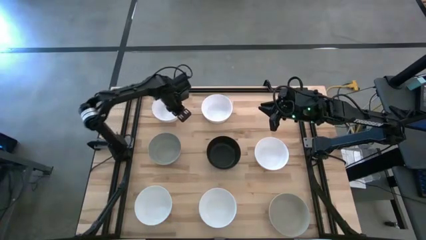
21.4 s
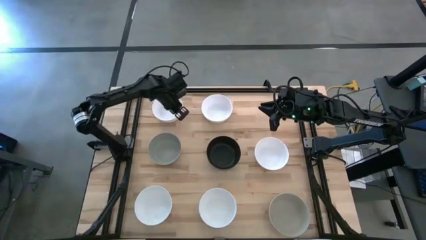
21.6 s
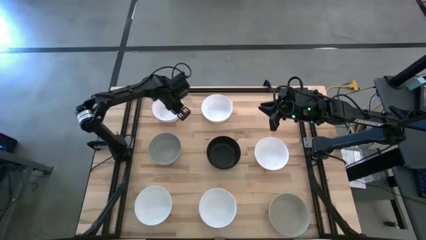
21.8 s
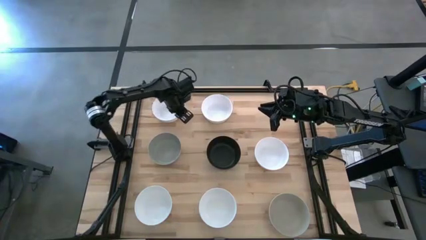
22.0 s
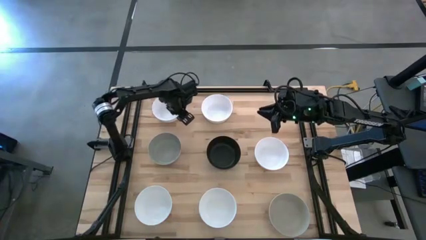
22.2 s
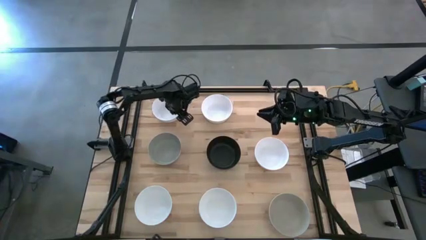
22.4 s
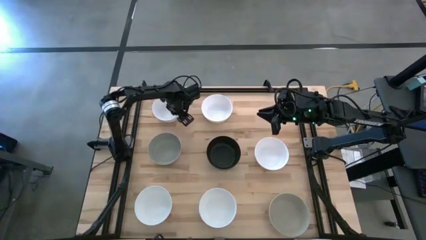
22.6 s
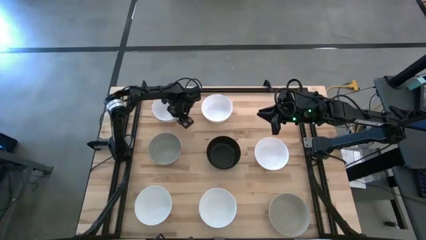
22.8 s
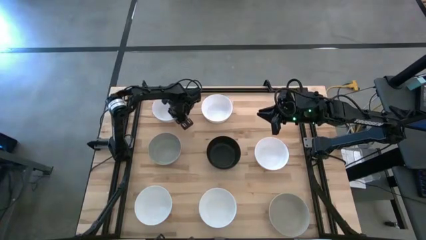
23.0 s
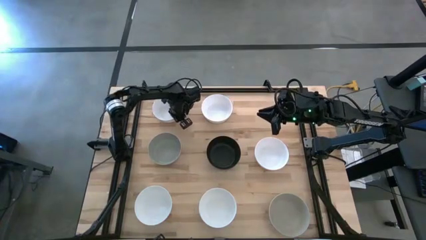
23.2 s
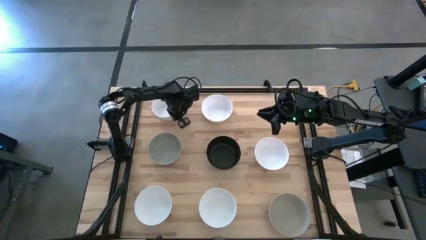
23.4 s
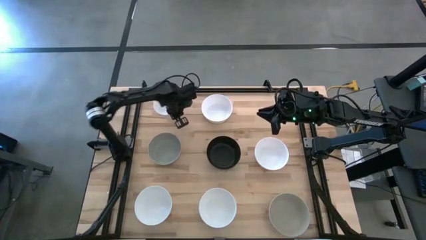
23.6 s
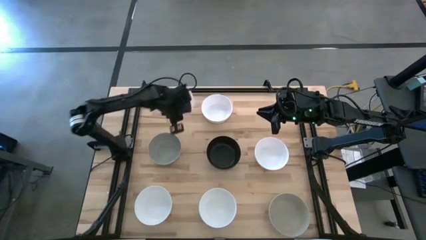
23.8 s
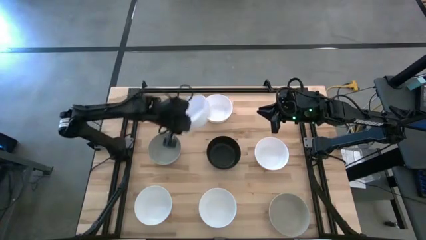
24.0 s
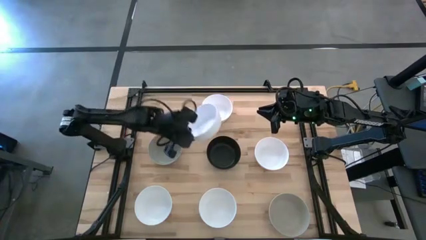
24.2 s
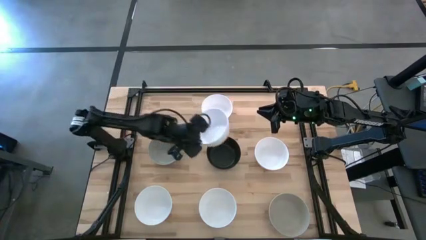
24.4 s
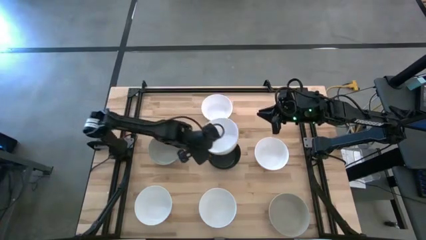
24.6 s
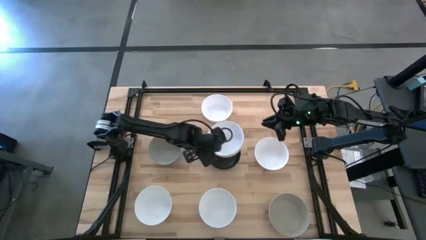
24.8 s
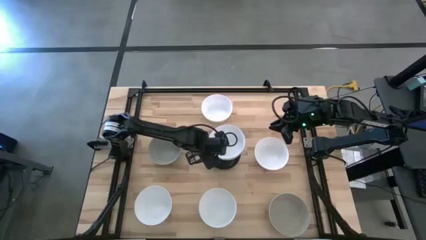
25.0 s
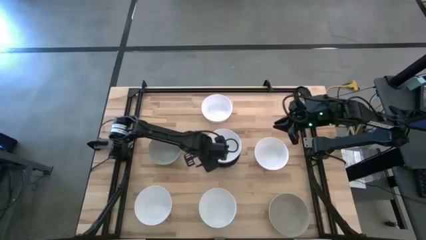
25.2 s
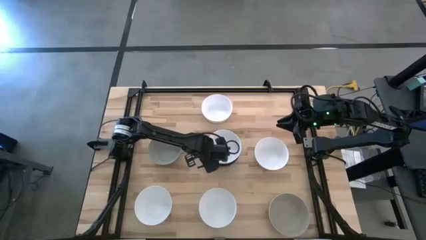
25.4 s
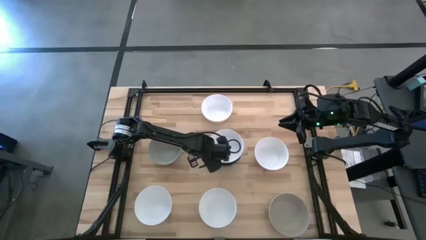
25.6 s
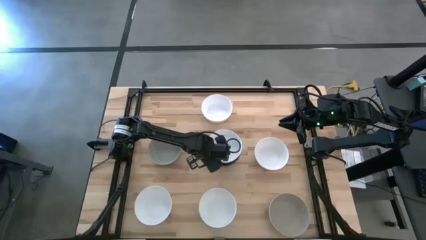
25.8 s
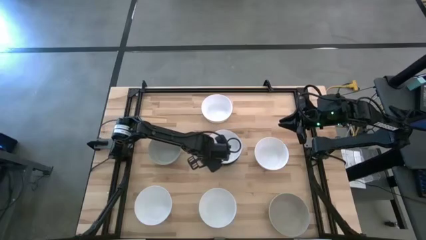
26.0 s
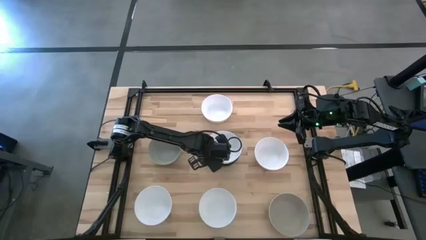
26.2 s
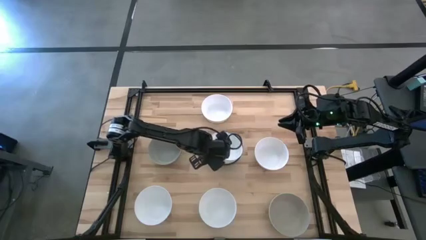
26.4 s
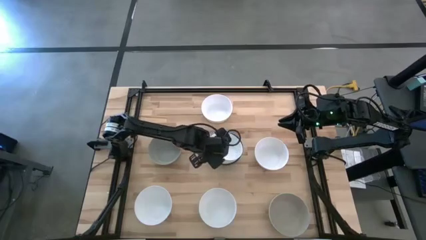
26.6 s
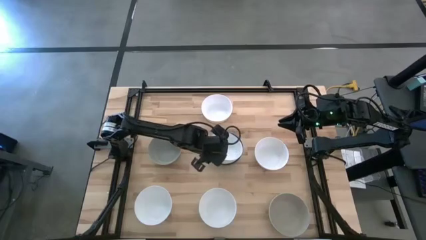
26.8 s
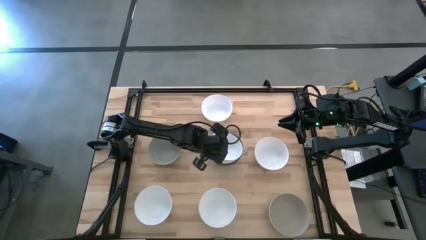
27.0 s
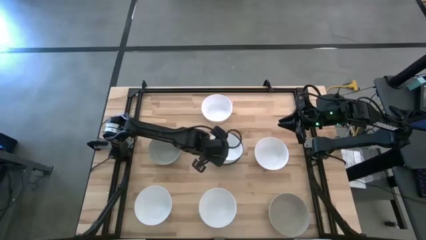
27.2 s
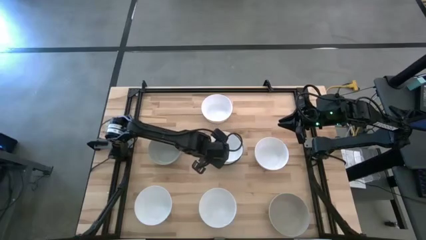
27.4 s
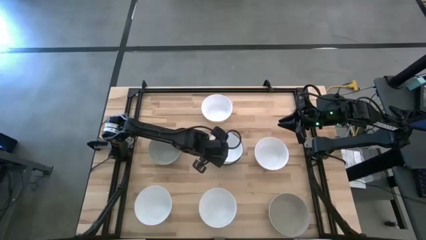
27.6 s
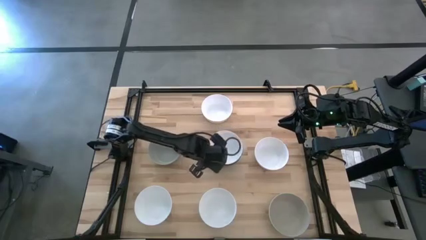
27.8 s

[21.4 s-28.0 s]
Task: Nest bowls inside each other
Stack the white bowl on the black bowl

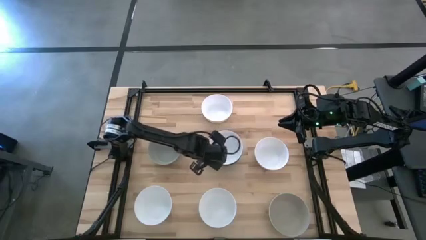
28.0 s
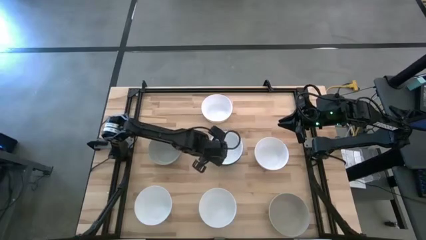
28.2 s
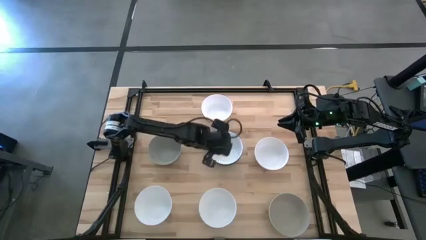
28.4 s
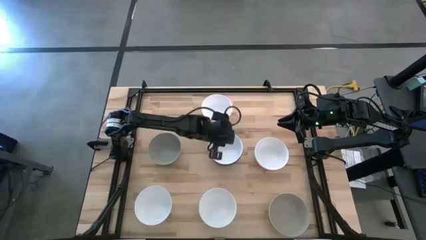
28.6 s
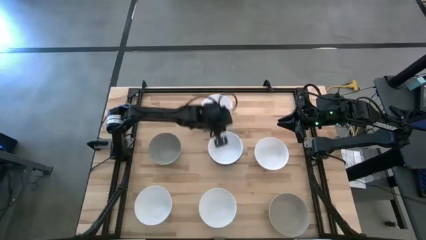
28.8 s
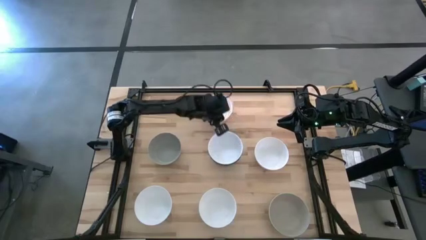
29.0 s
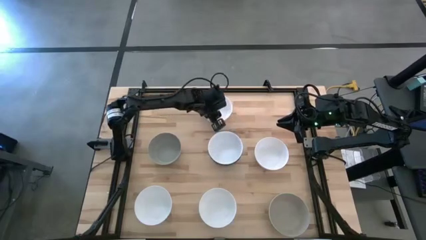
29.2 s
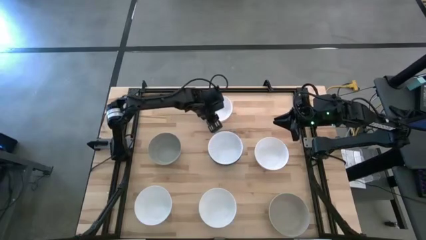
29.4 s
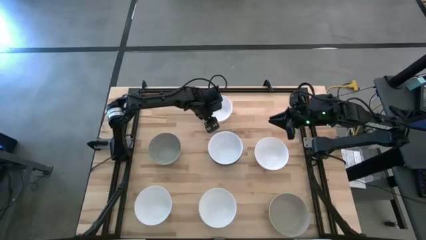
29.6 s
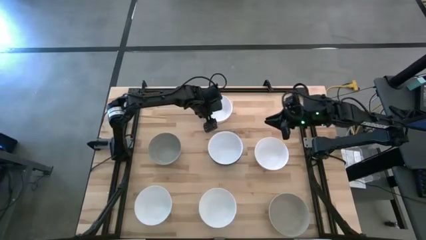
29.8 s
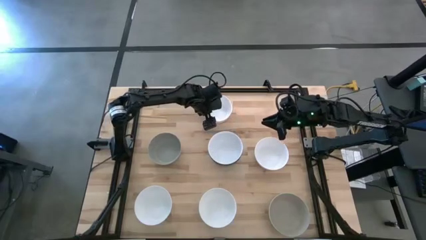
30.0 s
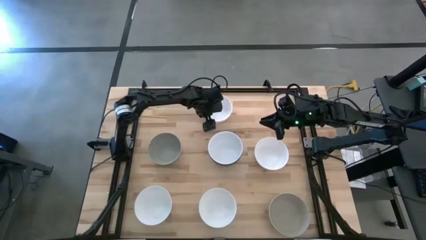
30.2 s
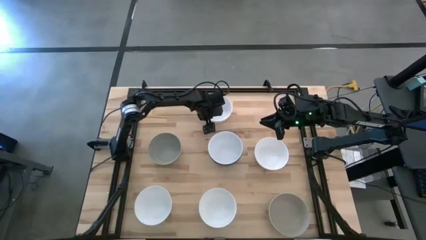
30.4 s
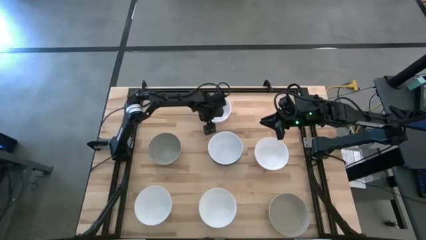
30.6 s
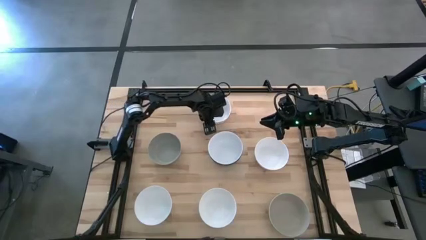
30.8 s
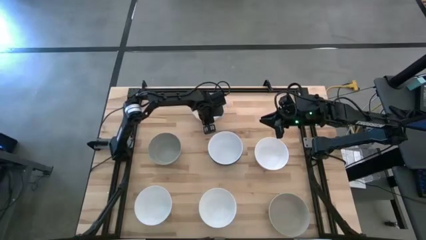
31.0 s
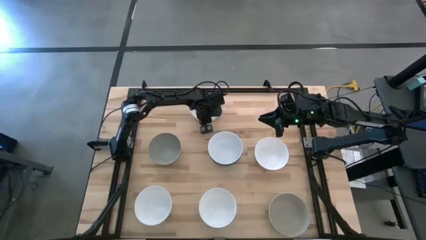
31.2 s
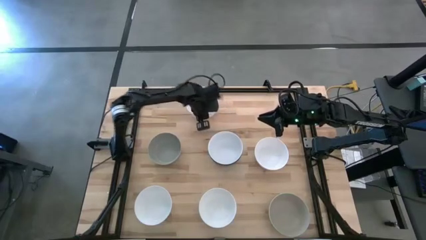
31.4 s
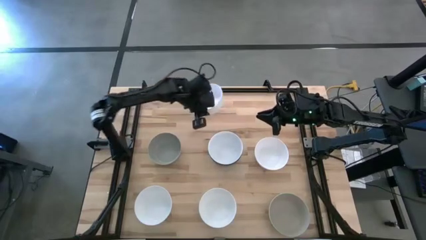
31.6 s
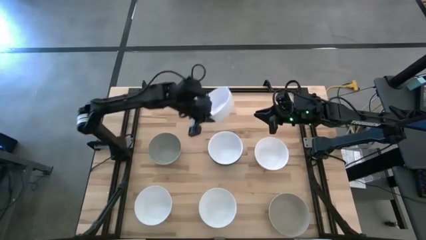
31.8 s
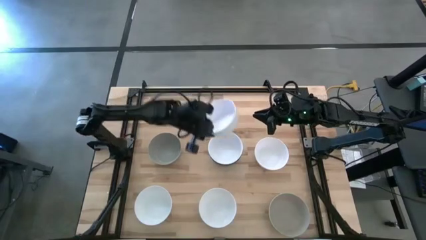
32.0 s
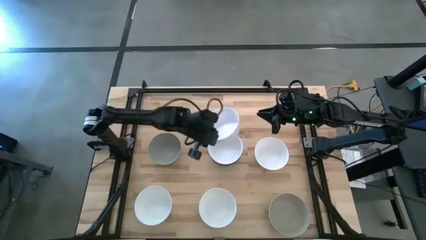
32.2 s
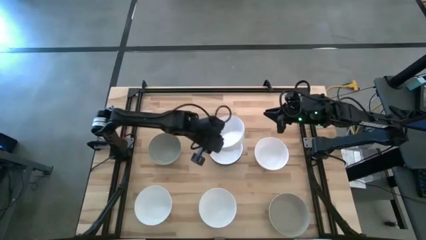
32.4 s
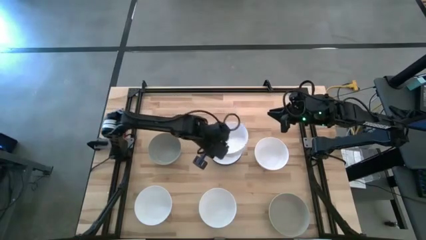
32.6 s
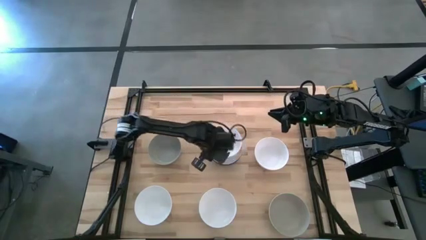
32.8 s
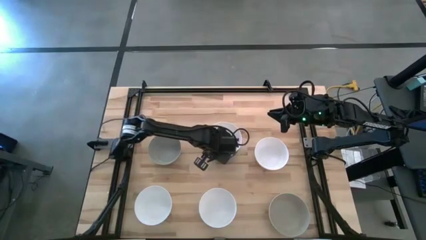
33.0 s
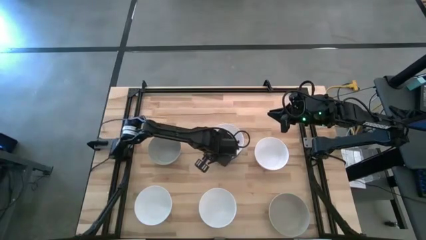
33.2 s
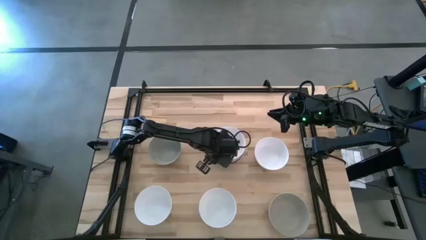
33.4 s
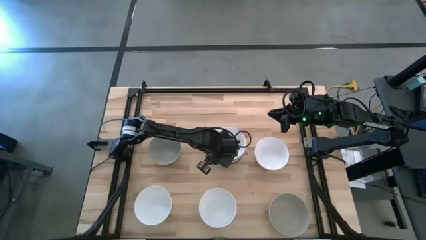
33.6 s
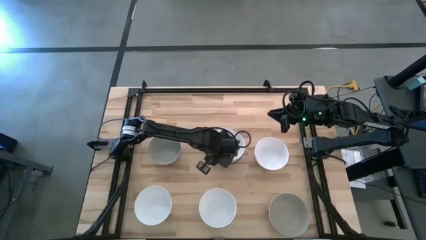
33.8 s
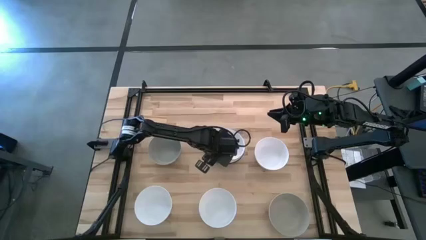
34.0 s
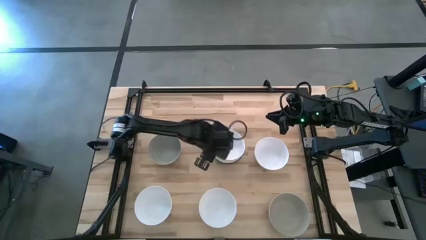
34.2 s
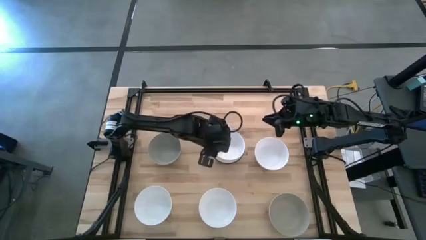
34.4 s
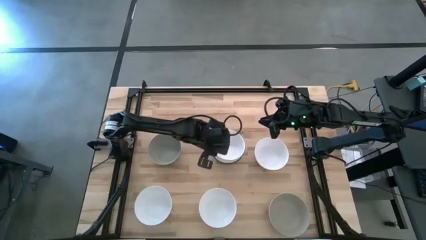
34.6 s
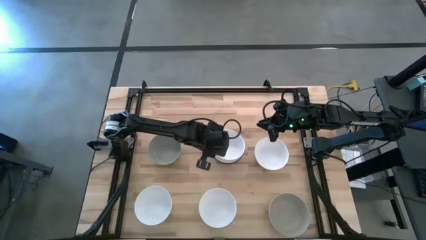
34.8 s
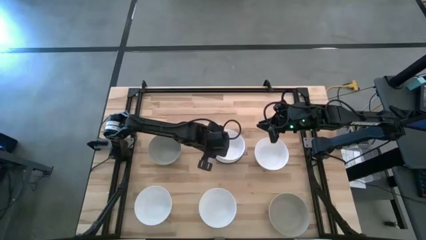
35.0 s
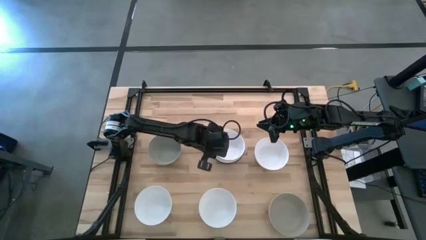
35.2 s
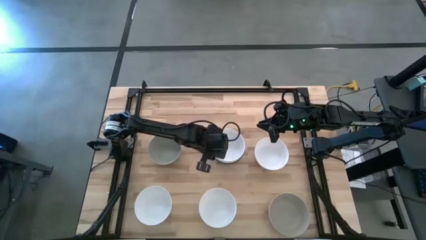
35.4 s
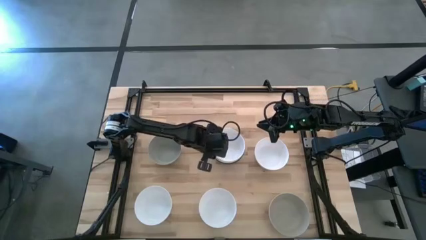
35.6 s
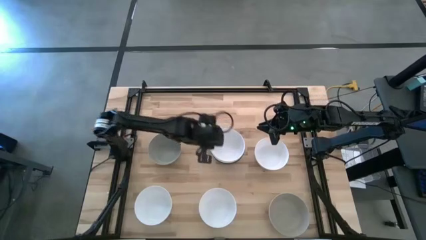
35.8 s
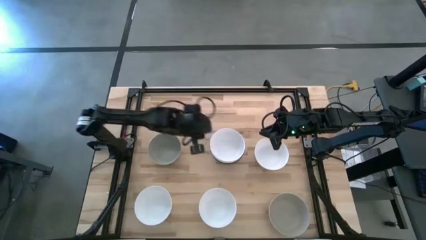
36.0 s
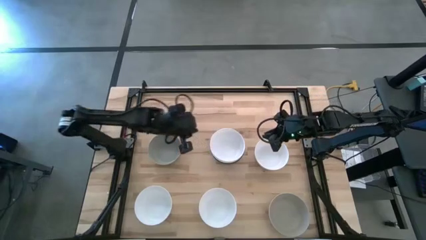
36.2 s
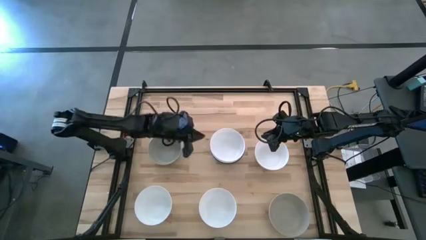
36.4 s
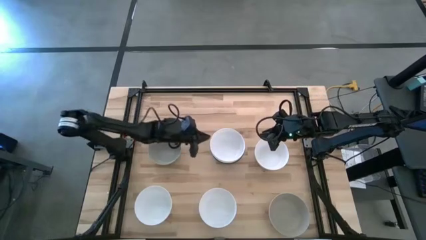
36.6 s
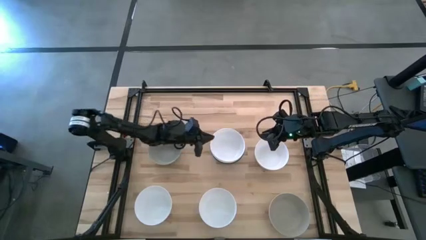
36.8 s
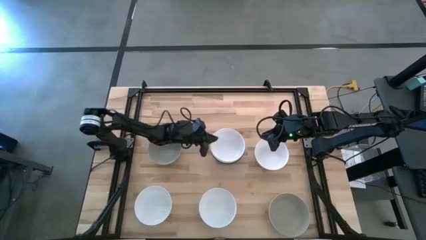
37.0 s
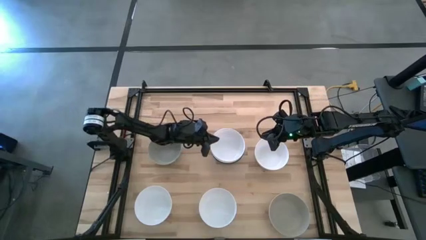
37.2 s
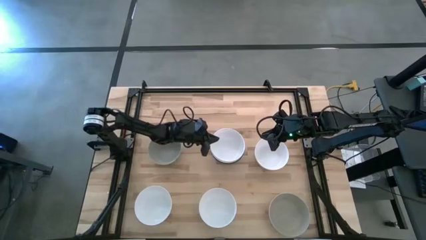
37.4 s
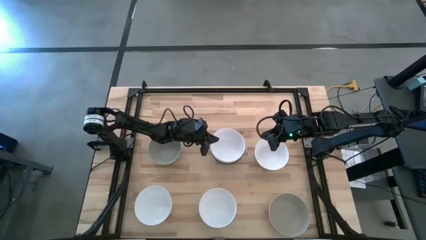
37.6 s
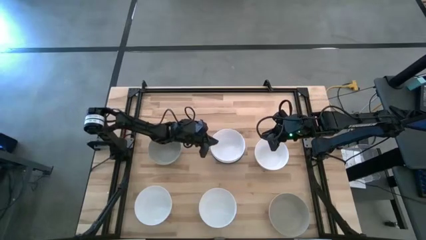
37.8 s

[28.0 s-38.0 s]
Stack the white bowl on the other white bowl
